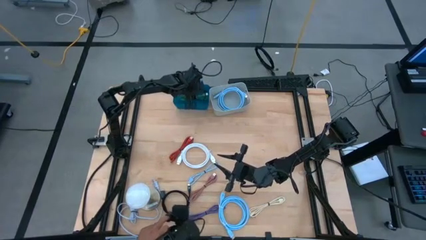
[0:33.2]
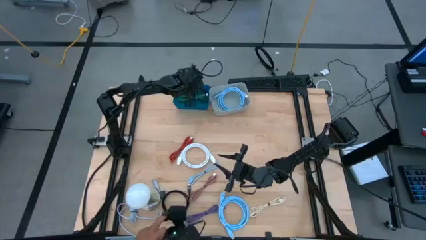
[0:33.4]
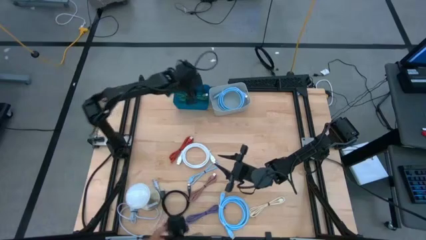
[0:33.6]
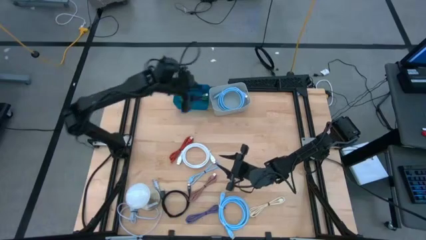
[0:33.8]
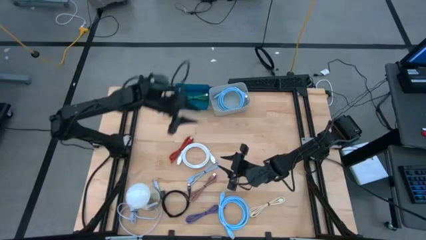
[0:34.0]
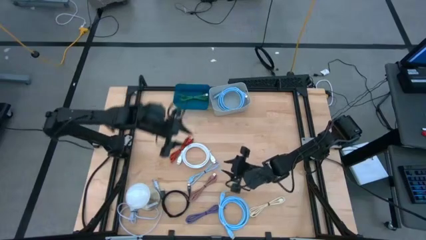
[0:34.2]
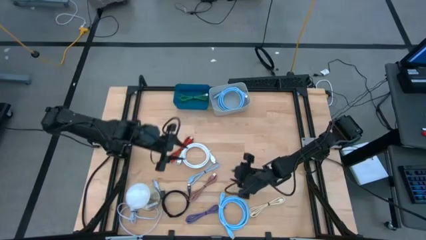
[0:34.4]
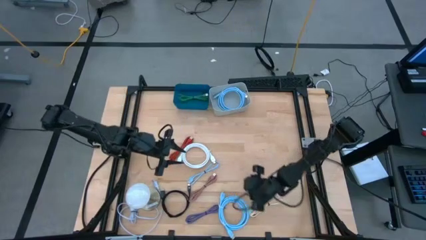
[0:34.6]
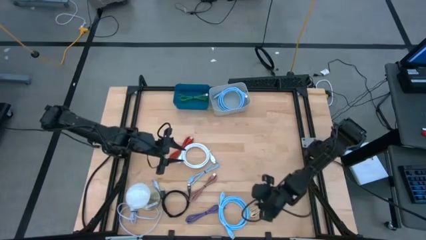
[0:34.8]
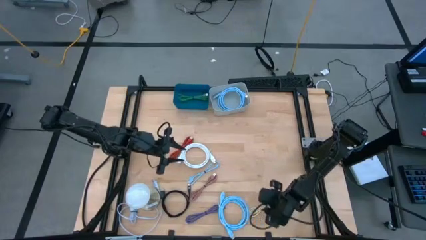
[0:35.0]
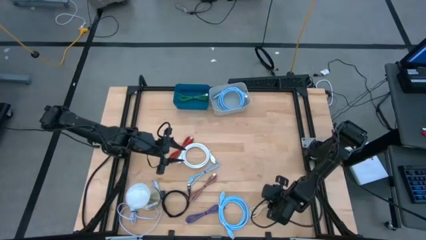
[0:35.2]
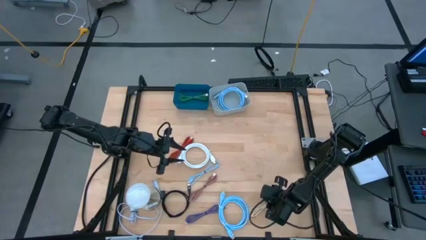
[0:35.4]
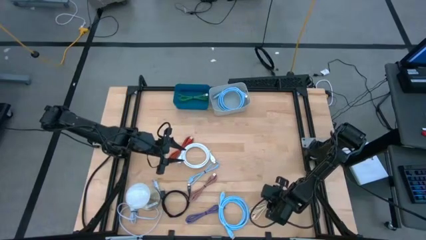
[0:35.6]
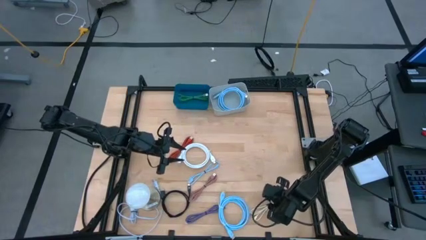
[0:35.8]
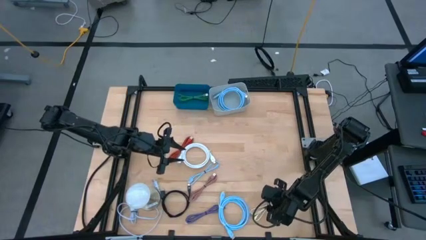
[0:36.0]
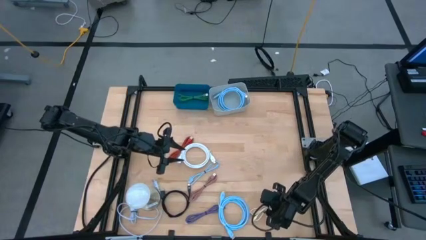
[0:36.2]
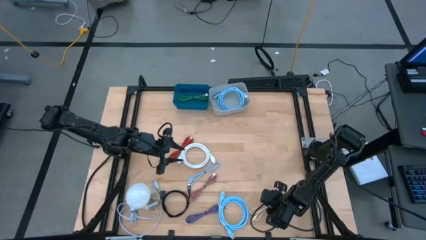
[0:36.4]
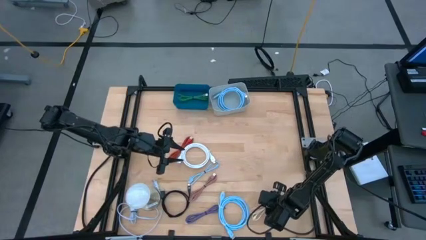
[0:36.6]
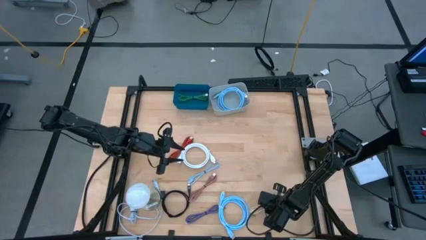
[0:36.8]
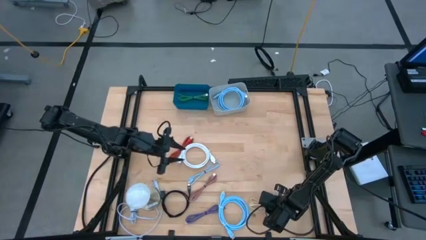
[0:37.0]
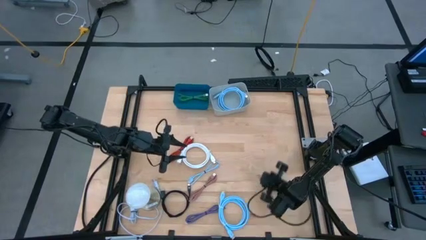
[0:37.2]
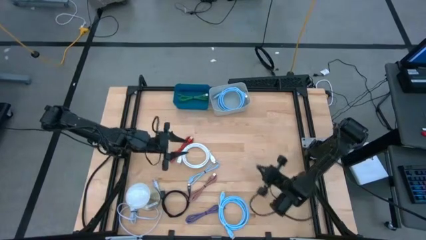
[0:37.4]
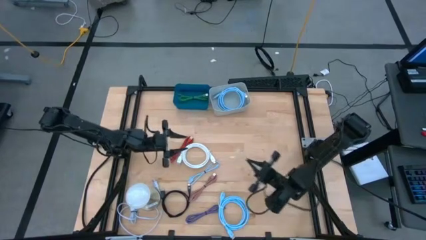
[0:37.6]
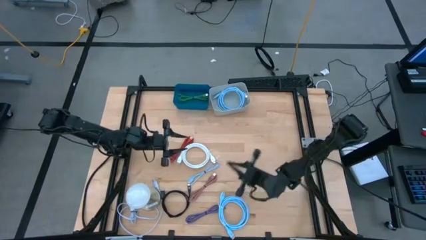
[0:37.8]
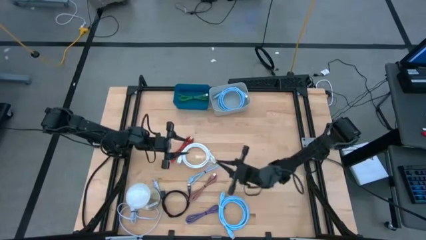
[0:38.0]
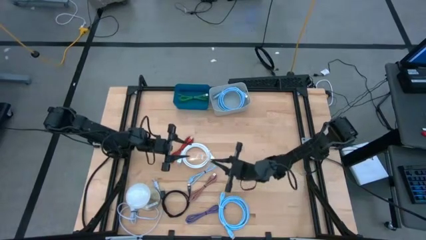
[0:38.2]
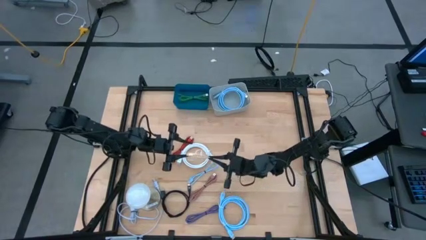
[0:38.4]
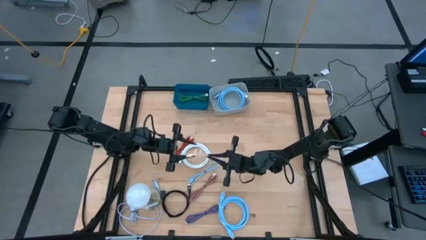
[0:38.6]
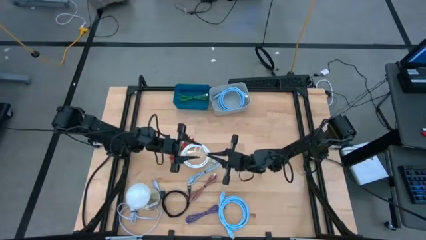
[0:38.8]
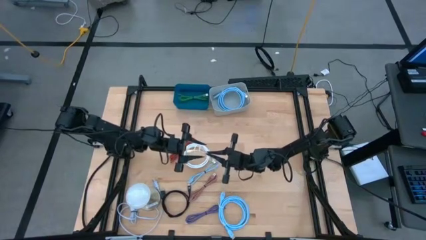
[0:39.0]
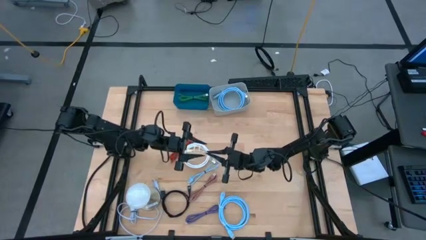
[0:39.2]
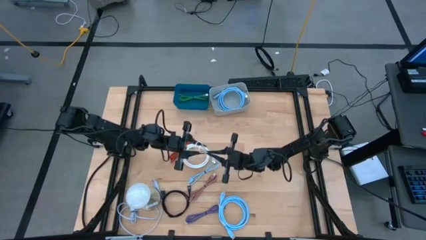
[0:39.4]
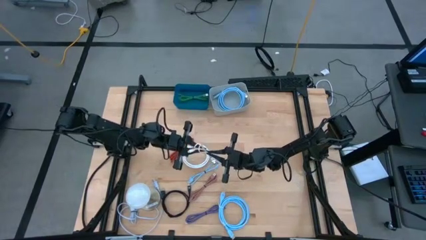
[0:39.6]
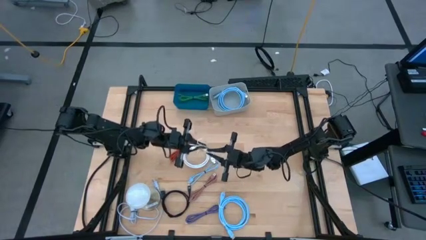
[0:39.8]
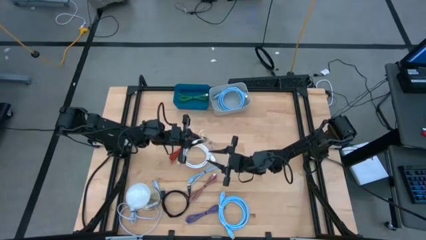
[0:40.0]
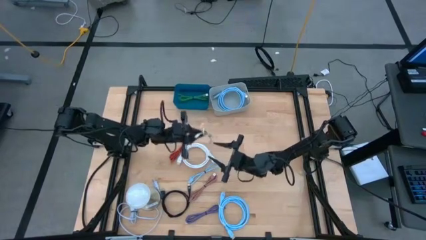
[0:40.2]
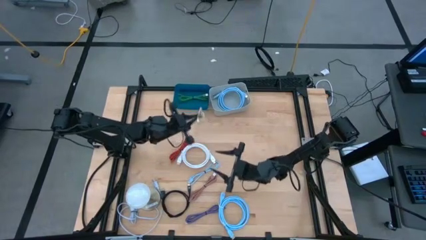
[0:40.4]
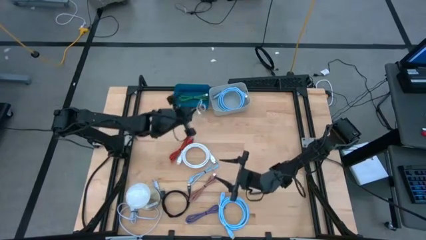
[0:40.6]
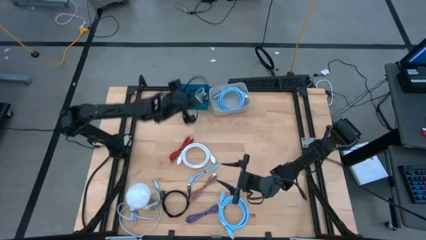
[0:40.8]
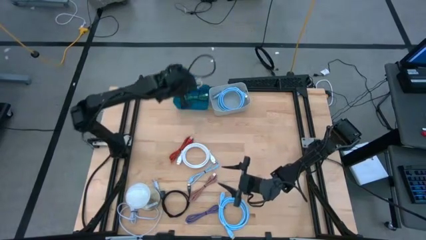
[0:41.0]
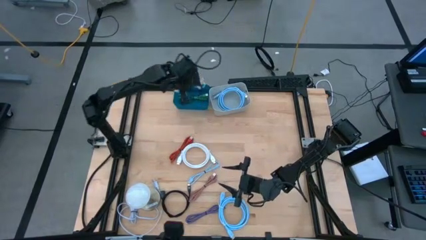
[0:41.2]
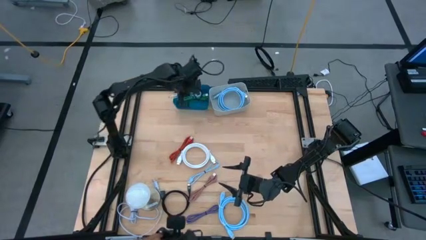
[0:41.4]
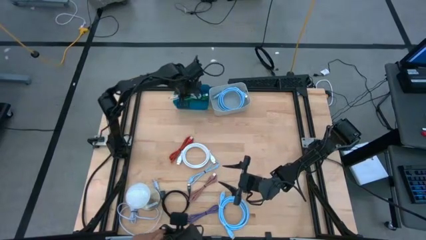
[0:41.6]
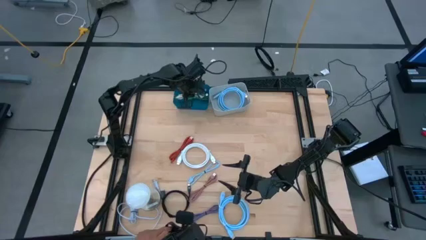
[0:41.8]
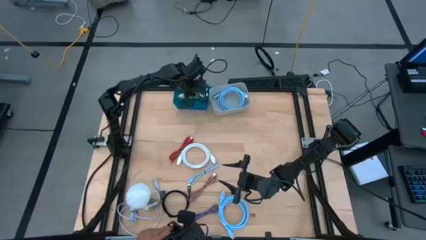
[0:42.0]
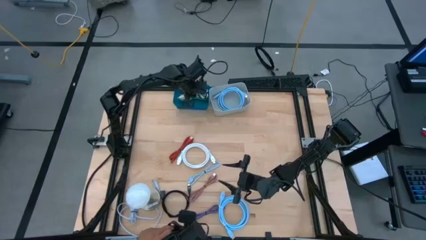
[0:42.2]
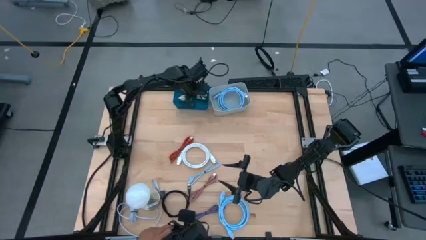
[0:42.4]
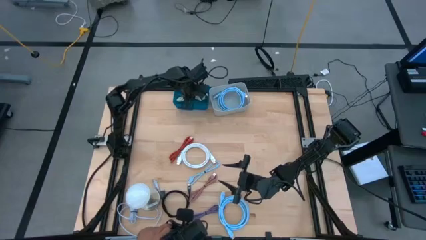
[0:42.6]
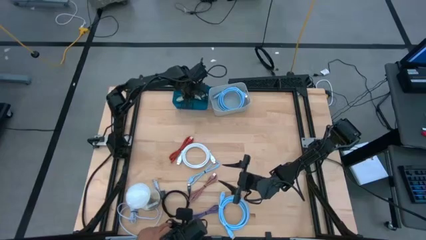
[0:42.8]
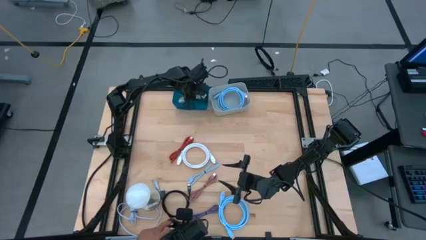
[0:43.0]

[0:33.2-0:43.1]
Task: Pick & Place USB Port
Put the white usb cable into the blue bin

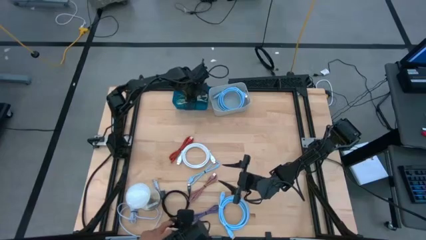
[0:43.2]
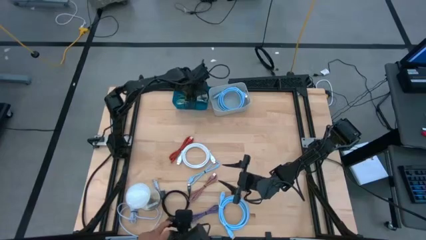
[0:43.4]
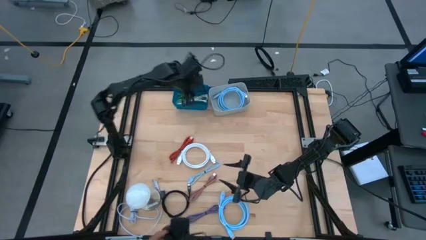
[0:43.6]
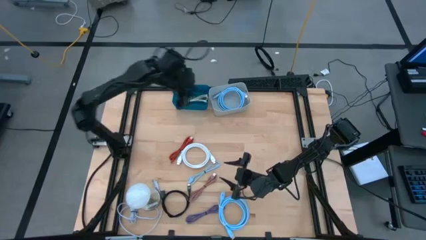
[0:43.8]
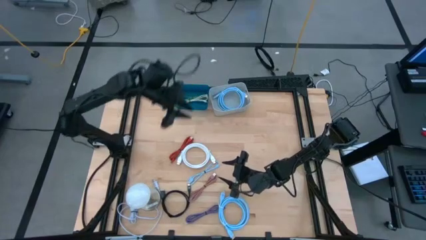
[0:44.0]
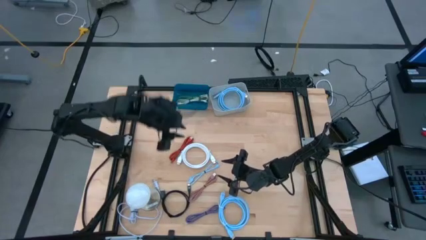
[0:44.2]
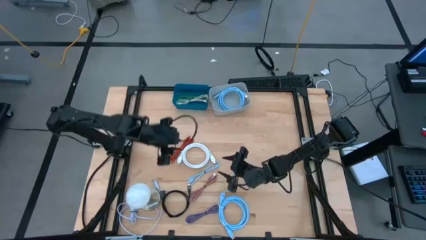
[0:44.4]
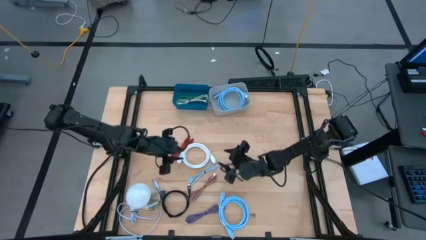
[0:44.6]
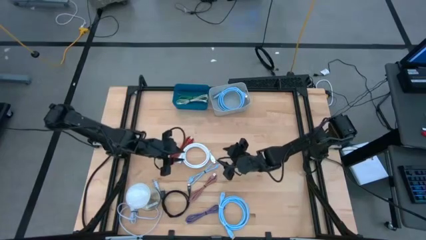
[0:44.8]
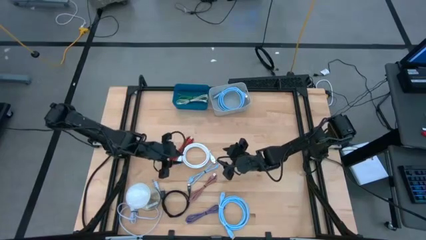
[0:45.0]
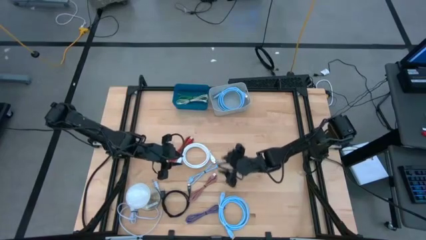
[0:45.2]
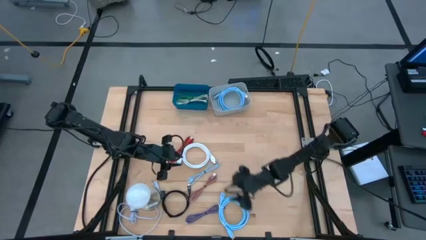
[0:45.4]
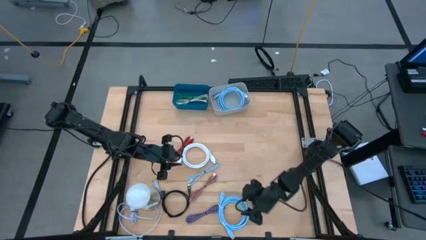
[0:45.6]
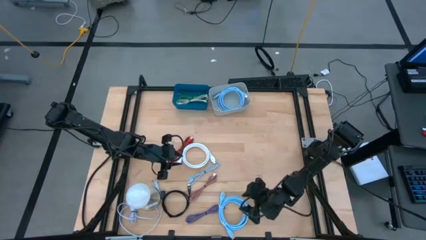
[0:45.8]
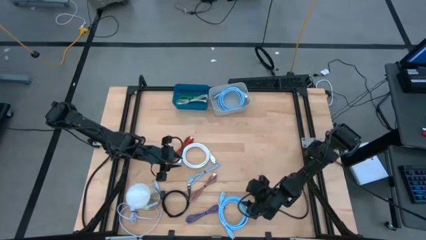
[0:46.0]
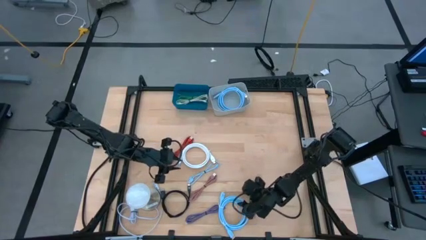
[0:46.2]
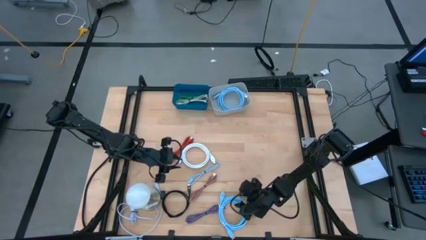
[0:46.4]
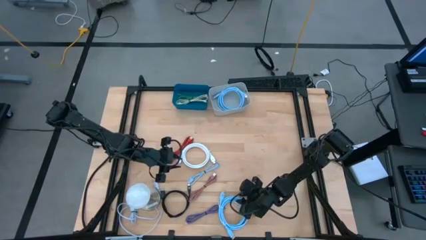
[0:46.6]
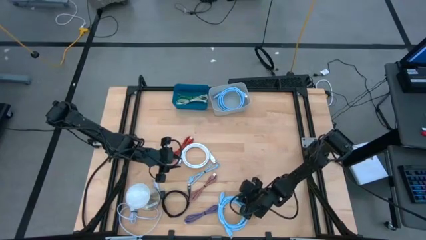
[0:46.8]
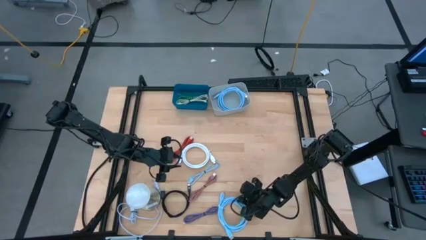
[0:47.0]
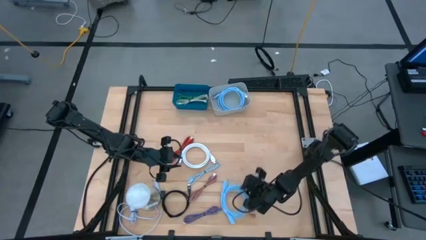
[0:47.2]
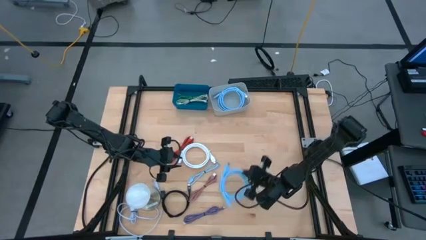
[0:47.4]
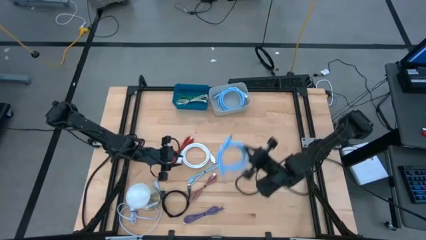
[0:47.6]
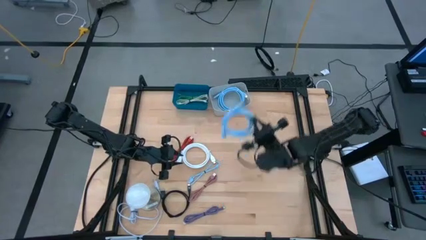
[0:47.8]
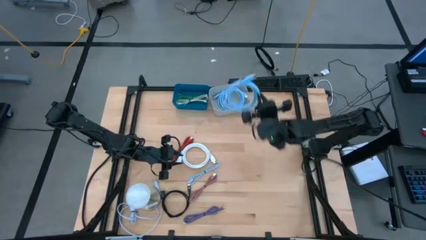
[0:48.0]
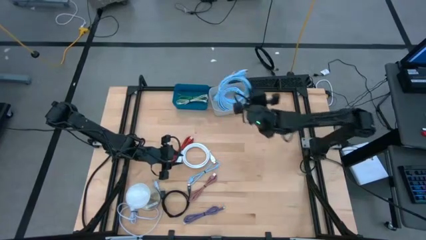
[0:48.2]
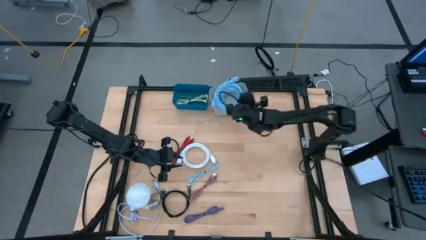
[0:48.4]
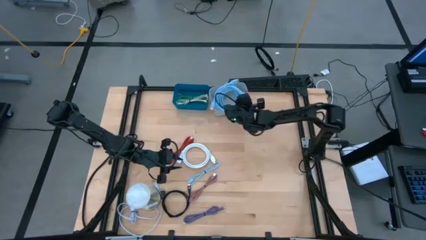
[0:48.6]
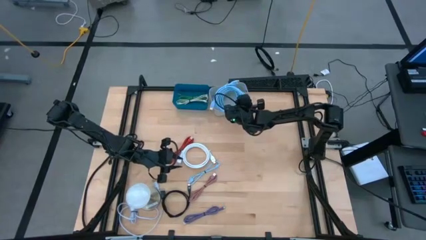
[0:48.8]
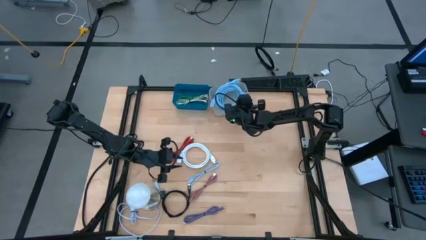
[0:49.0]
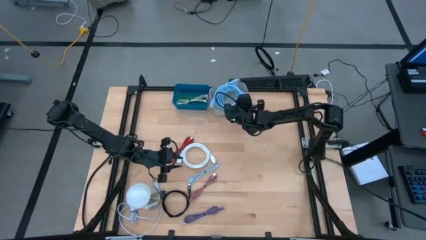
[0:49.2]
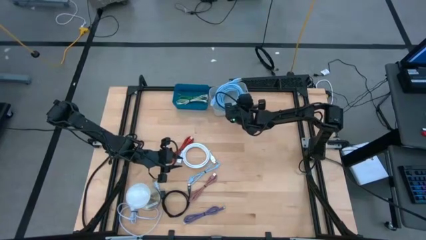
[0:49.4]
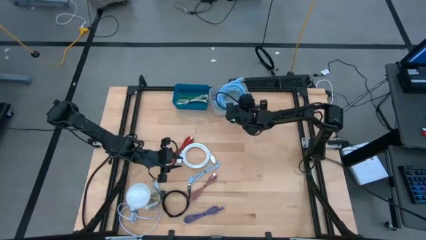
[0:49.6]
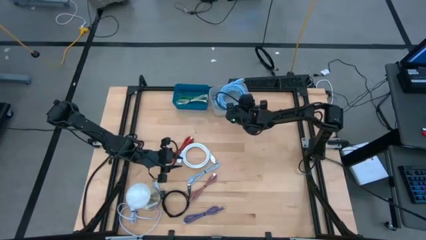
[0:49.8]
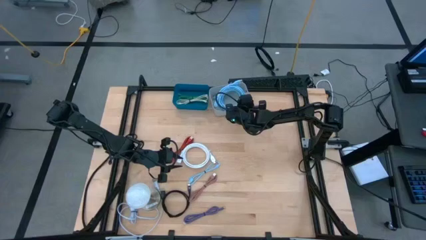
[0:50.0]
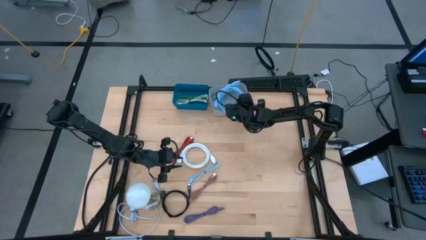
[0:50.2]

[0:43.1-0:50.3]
Put the blue hdmi cable into the gray bin
